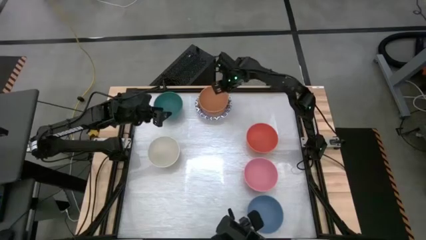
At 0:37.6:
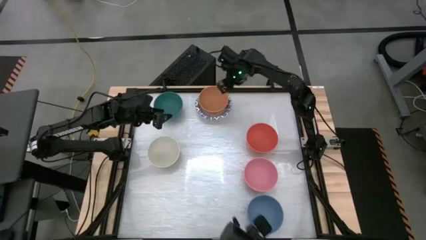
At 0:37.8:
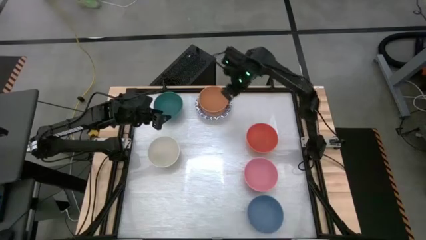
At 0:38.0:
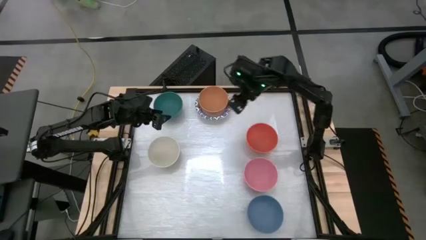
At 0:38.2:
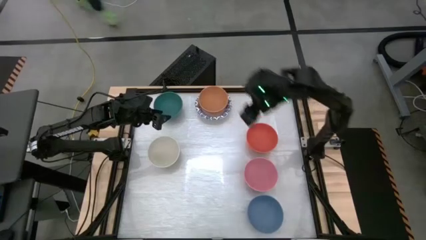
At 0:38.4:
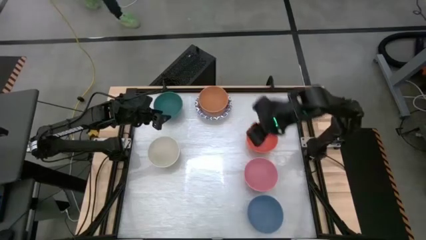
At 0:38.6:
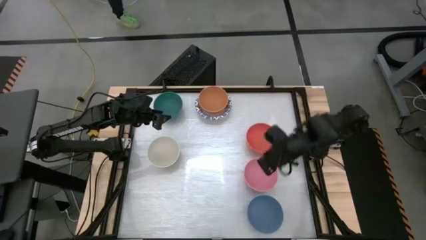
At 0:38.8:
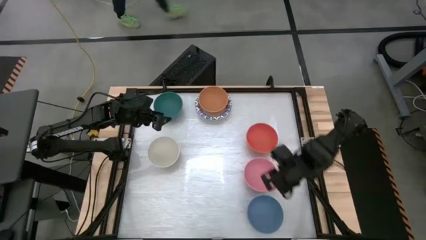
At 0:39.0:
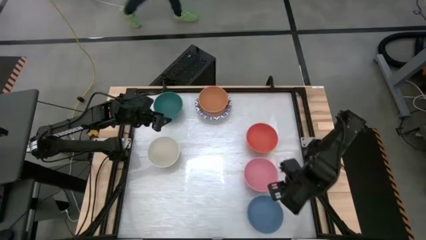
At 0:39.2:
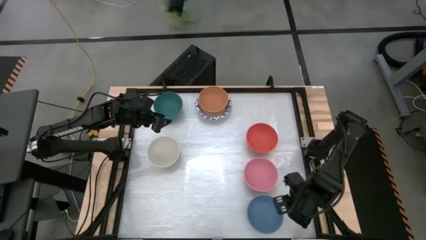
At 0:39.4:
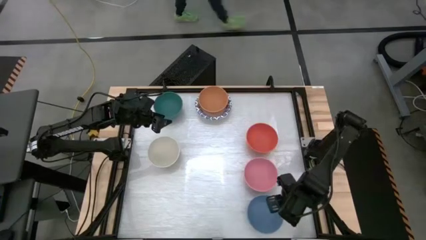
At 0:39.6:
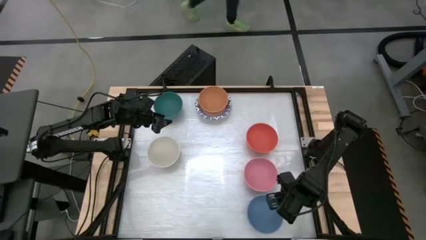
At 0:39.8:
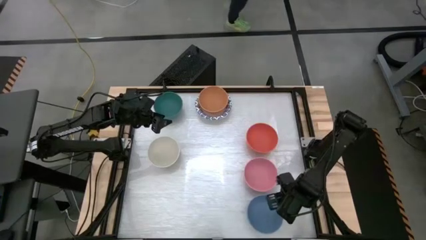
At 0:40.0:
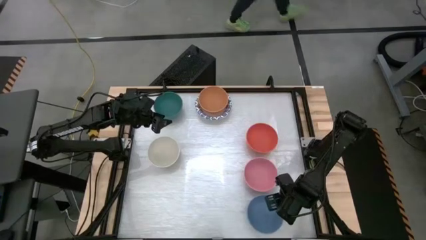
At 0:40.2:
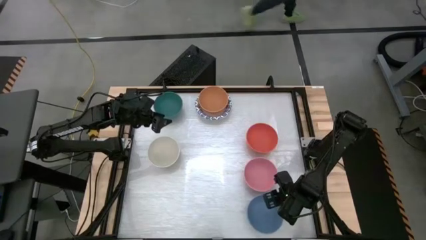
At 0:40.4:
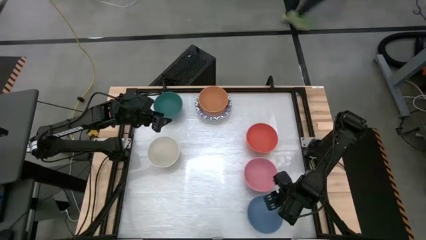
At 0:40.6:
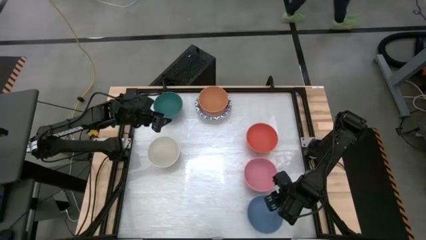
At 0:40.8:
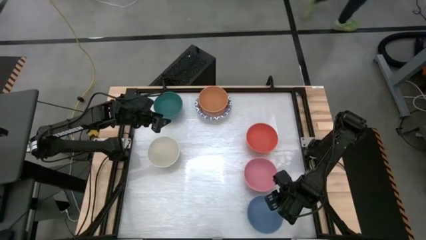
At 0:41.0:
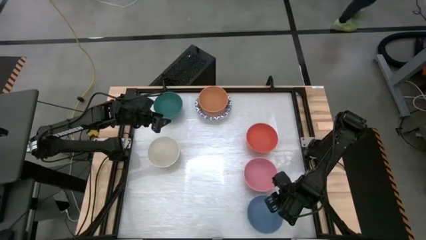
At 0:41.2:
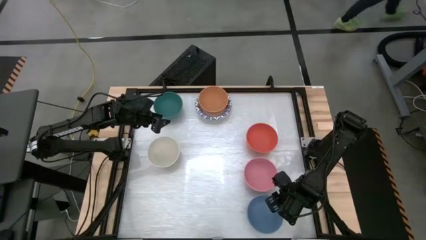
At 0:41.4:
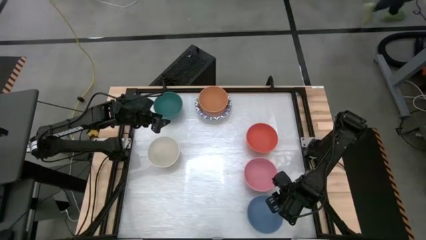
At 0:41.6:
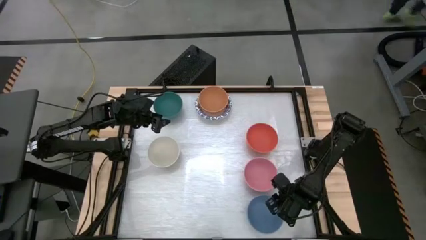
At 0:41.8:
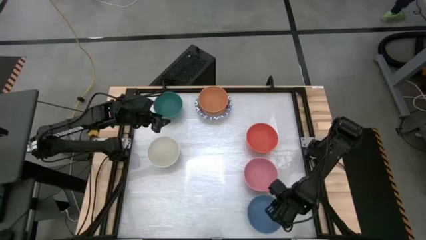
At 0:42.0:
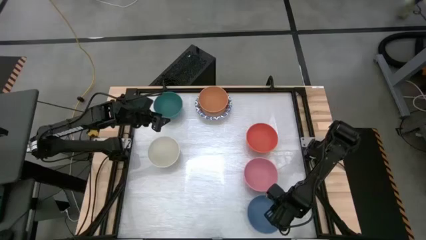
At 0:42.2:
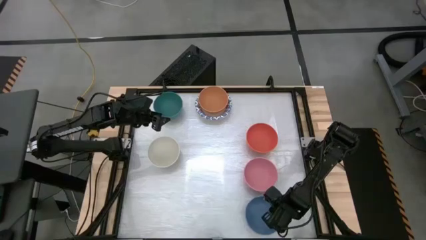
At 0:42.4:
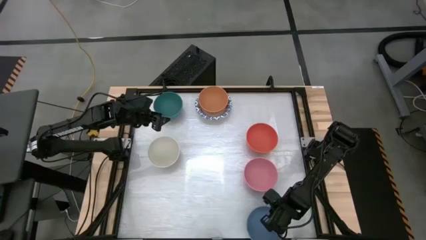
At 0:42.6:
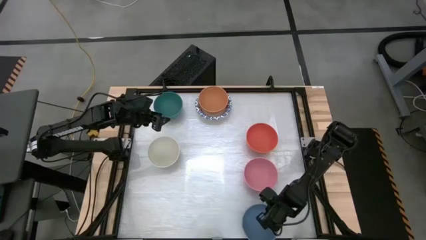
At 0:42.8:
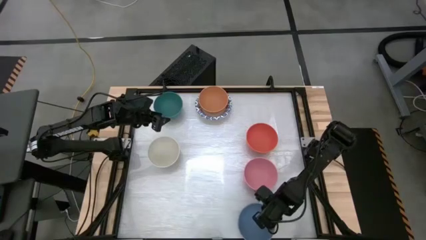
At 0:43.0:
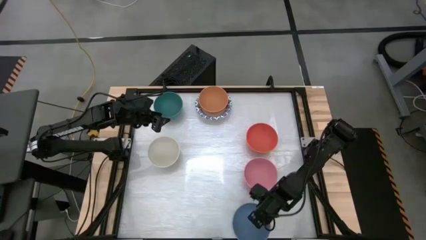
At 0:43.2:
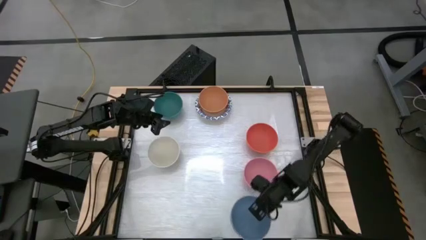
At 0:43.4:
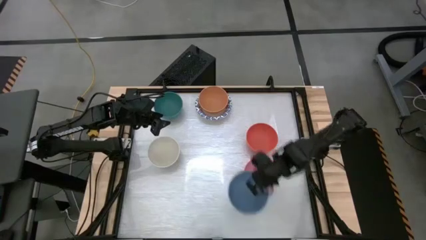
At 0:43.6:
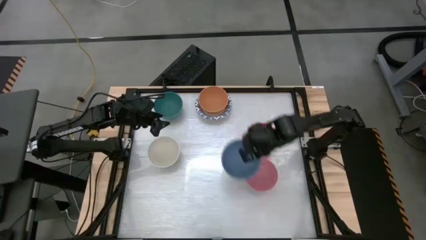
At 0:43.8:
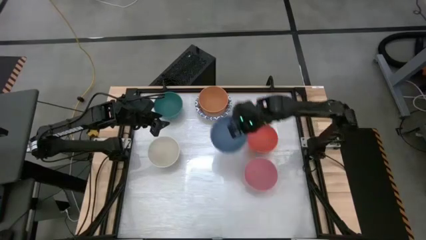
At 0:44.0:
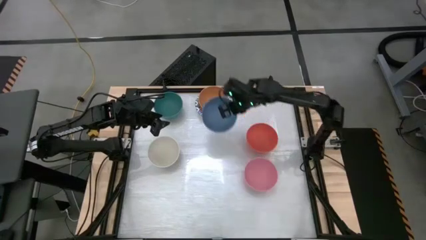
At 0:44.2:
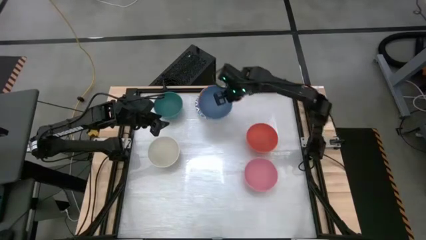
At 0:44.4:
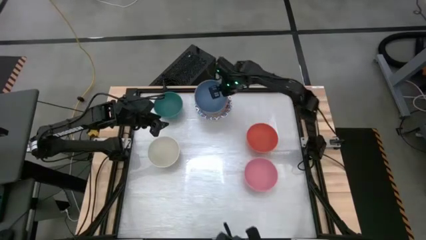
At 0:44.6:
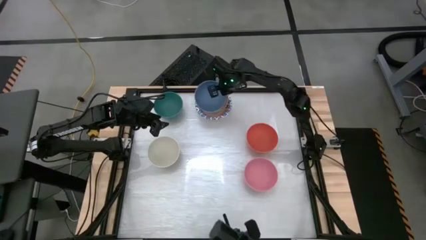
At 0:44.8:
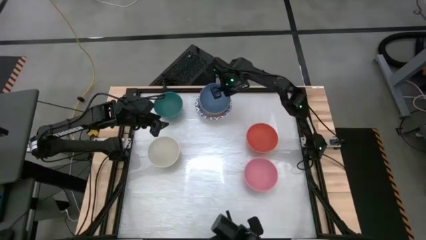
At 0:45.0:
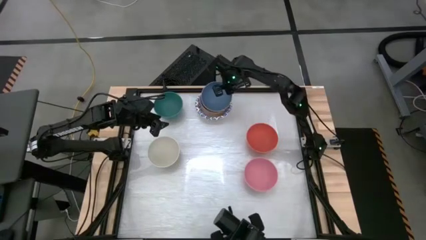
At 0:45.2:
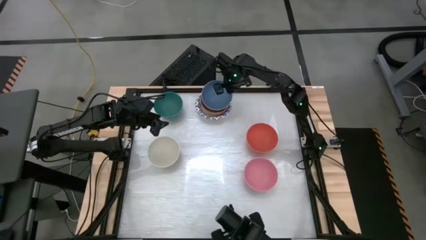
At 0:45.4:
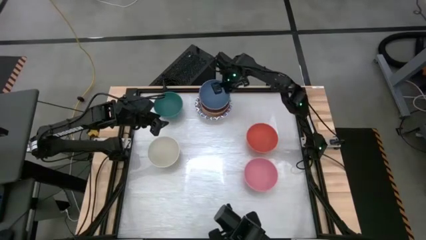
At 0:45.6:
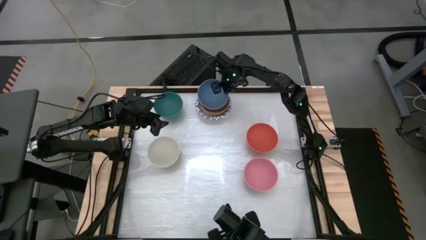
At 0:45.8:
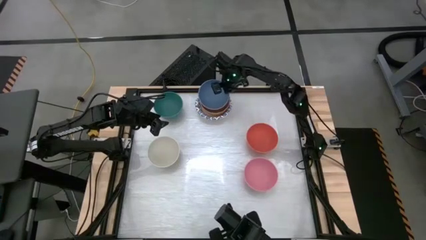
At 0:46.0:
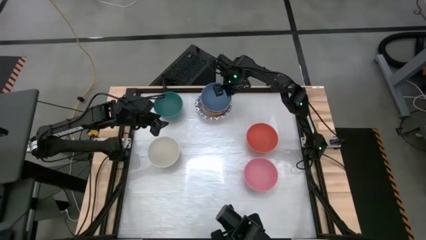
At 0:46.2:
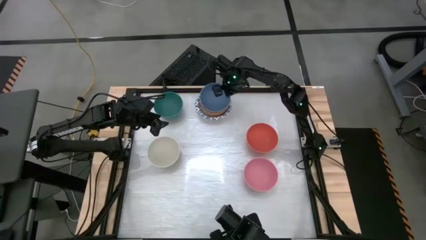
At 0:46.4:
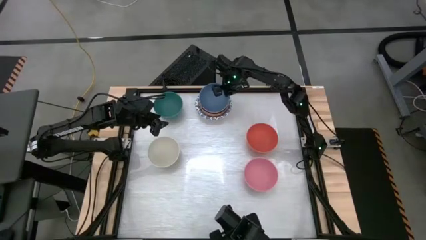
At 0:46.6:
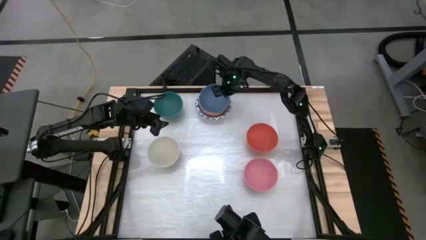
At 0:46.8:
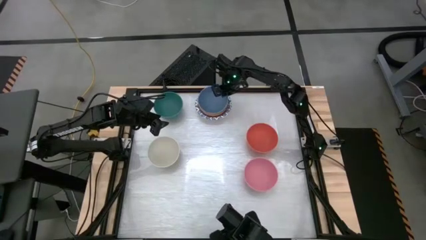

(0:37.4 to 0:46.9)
Task: Nest bowls inside each other by size order
Stack the blue bowl on top of the brown bowl

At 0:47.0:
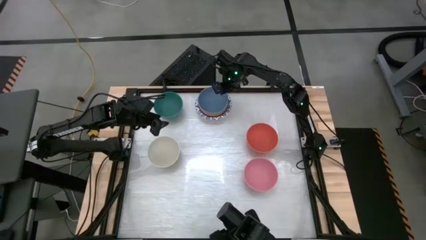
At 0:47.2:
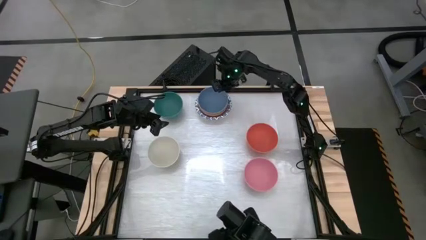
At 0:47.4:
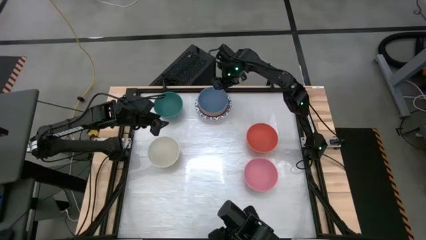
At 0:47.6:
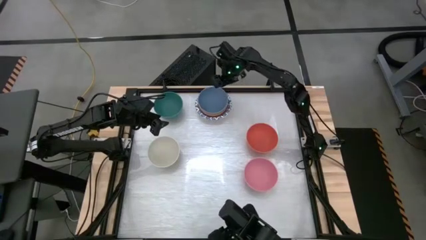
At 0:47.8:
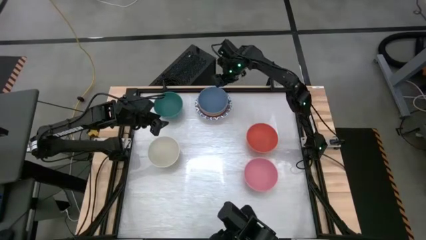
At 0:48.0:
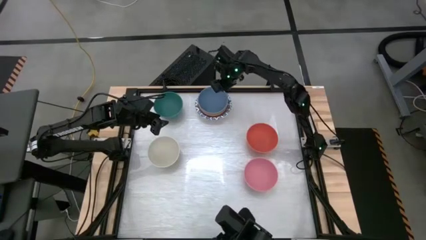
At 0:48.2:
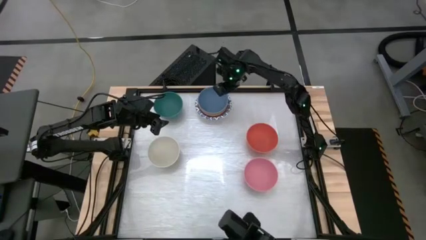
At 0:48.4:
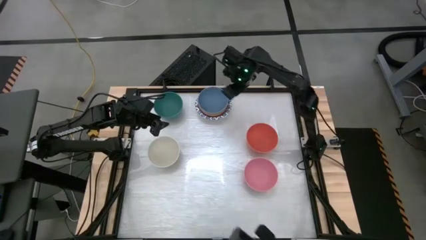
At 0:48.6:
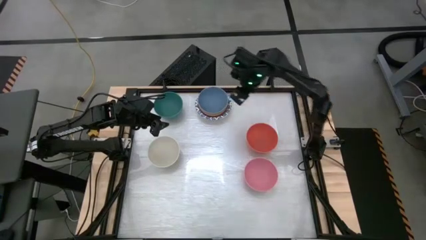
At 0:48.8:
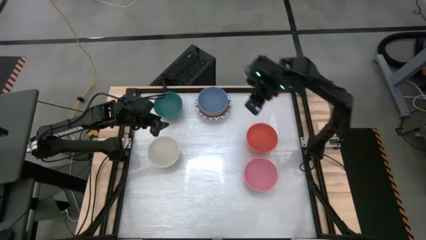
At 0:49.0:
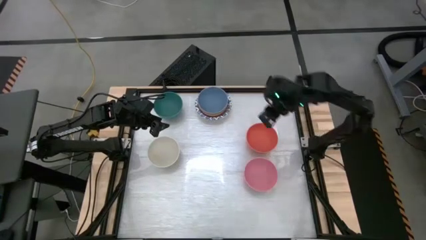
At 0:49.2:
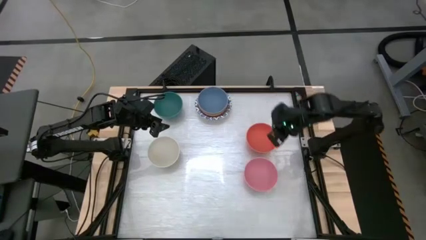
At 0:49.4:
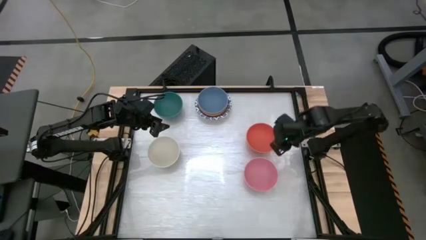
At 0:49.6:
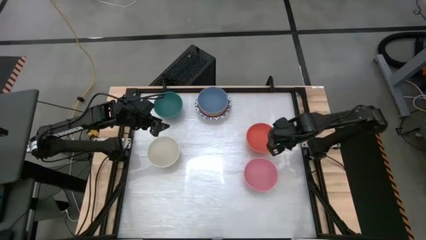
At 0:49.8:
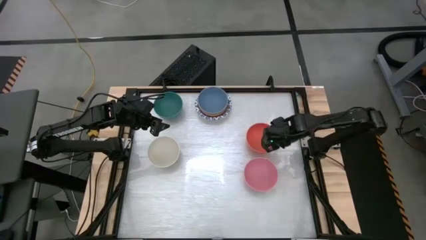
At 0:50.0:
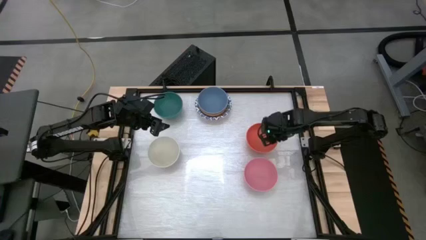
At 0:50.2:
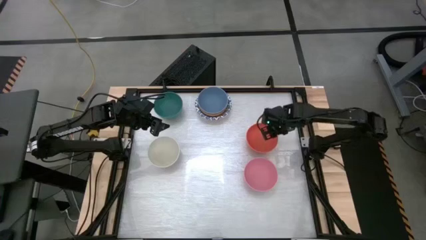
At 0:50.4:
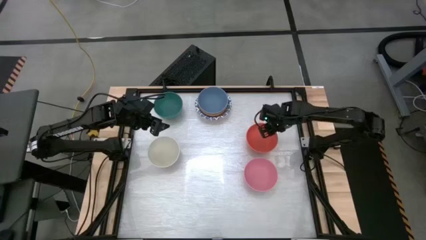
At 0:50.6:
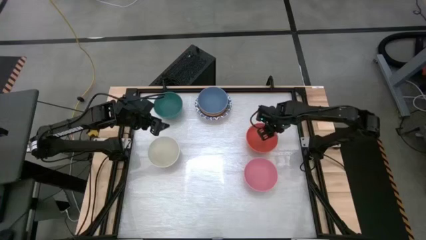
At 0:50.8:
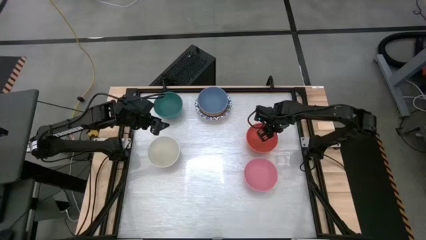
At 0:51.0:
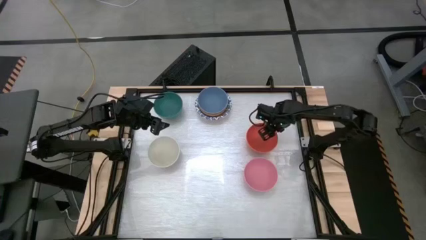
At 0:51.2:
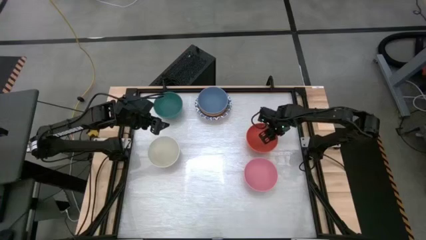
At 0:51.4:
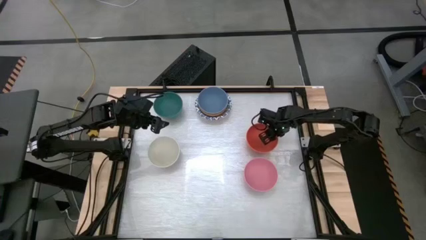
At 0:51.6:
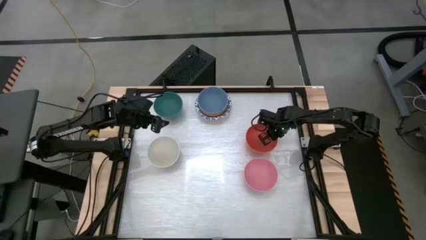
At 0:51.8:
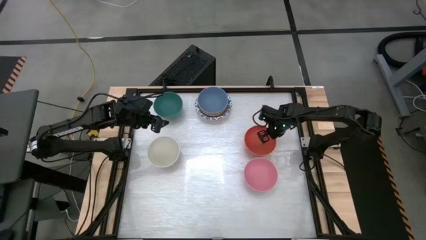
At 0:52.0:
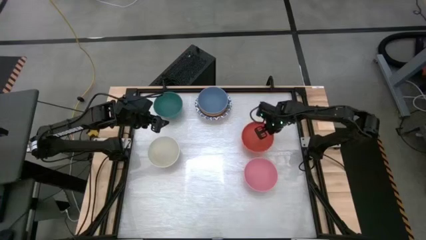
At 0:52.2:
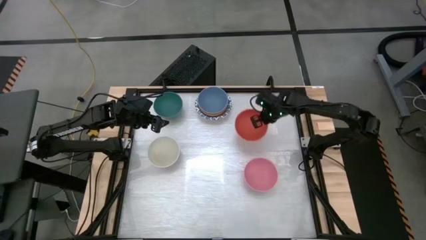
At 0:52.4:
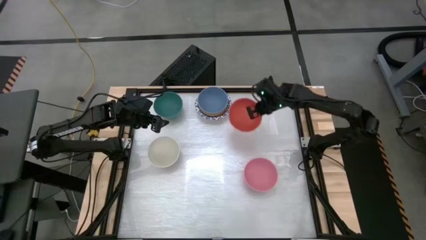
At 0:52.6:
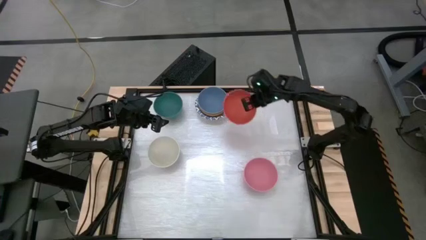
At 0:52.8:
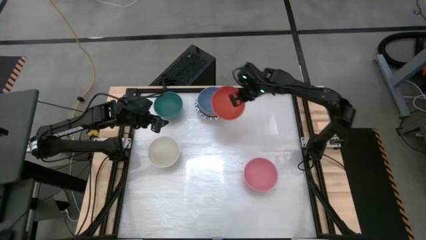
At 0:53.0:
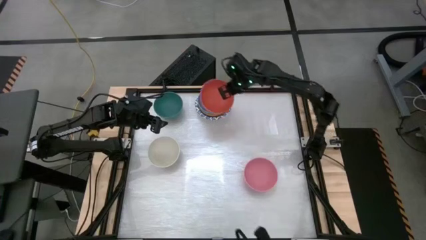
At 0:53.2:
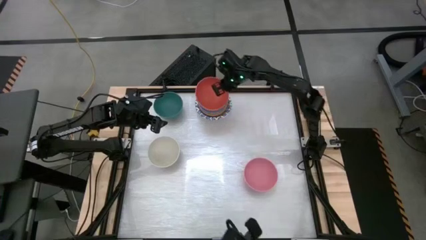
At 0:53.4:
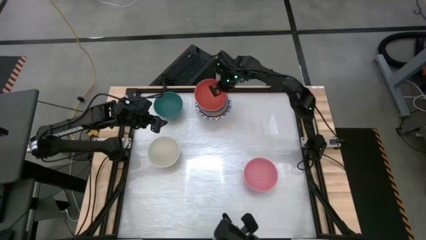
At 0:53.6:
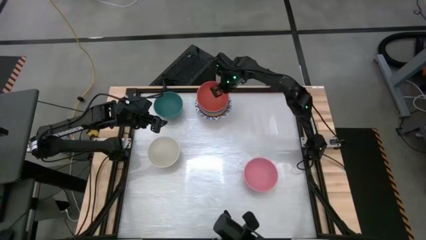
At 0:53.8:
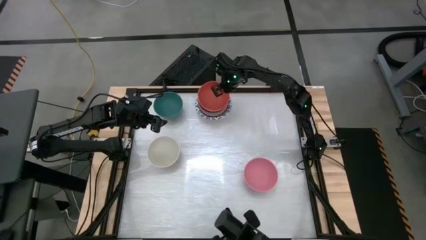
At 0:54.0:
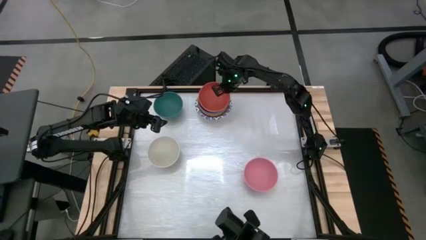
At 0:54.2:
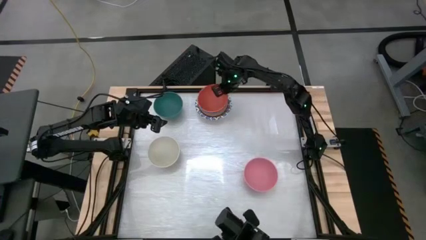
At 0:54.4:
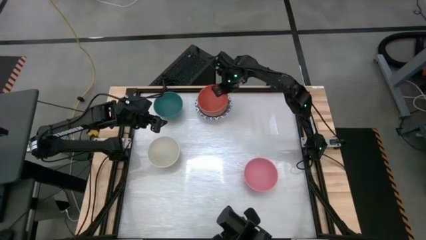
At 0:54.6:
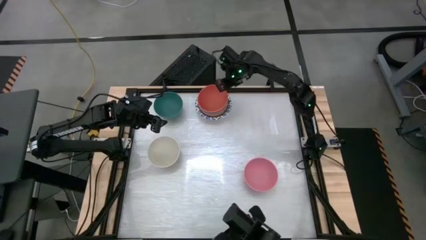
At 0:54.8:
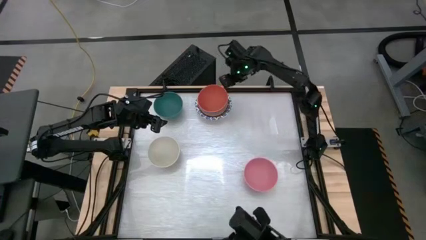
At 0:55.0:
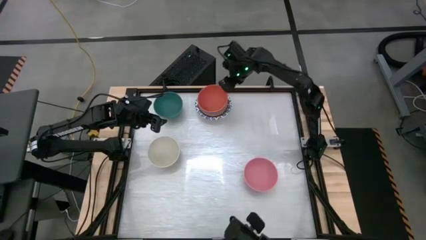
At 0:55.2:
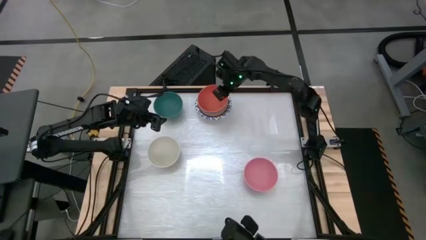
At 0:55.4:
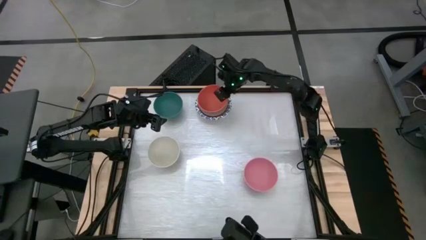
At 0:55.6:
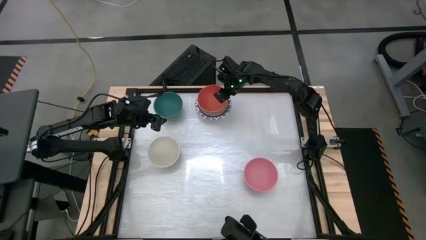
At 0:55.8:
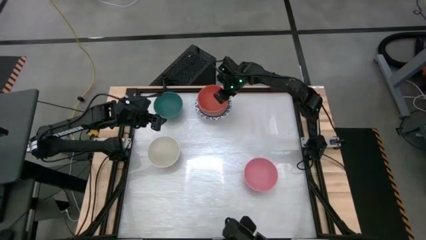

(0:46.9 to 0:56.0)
Stack the orange bowl on top of the blue bowl
